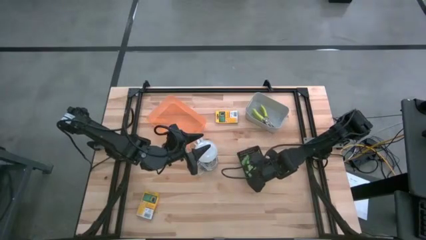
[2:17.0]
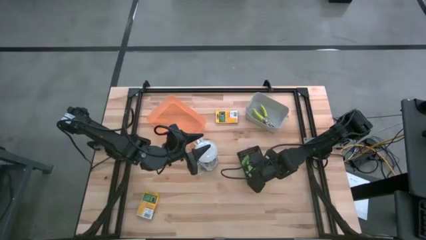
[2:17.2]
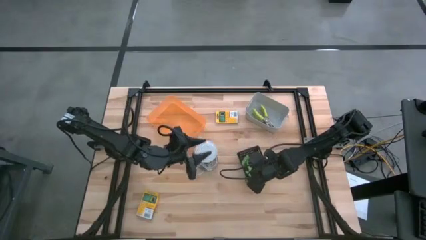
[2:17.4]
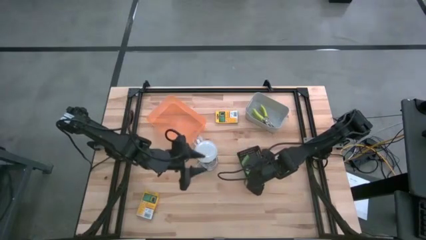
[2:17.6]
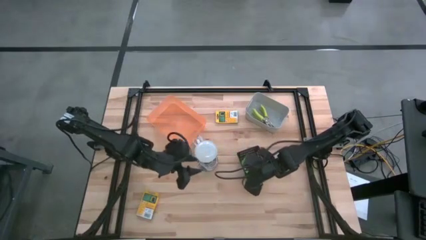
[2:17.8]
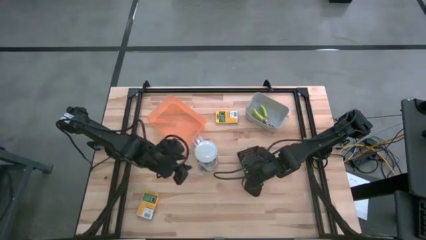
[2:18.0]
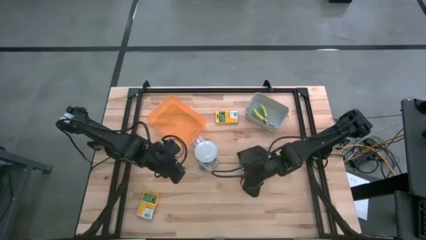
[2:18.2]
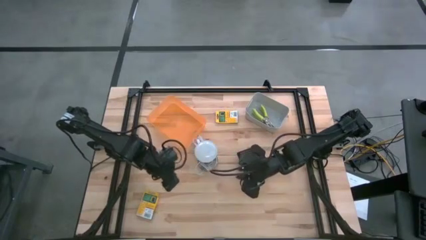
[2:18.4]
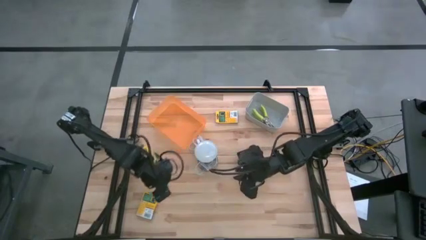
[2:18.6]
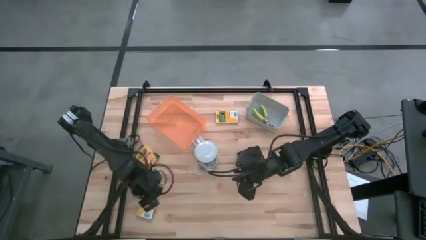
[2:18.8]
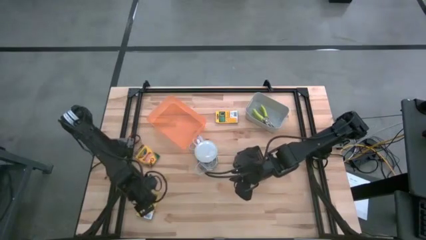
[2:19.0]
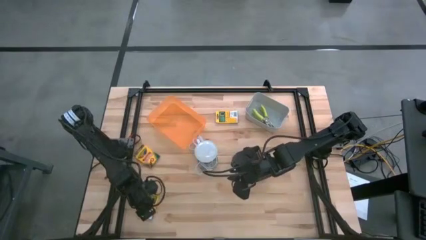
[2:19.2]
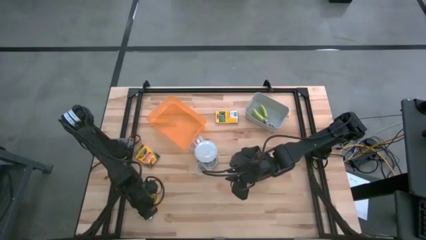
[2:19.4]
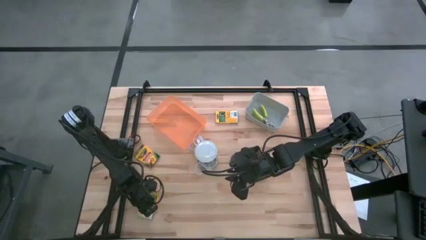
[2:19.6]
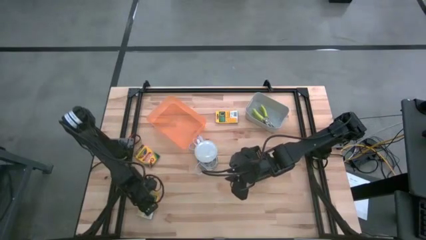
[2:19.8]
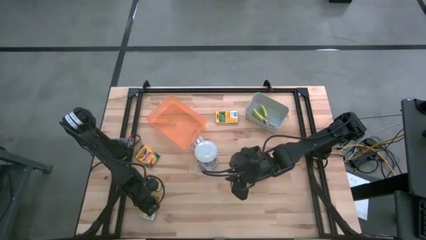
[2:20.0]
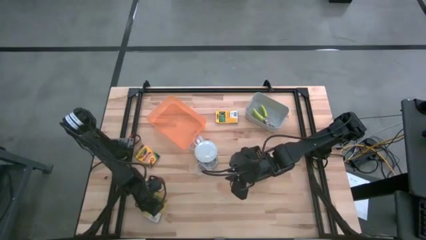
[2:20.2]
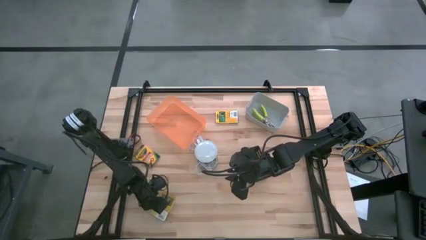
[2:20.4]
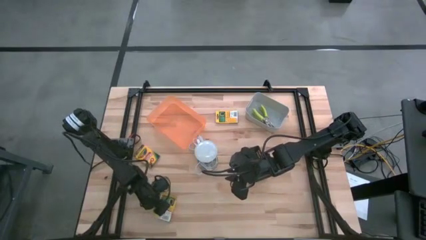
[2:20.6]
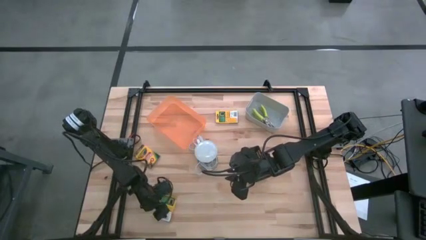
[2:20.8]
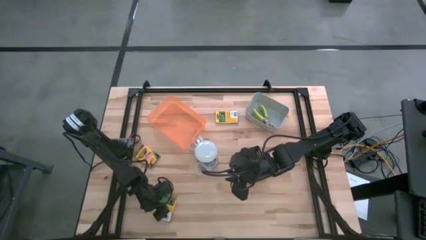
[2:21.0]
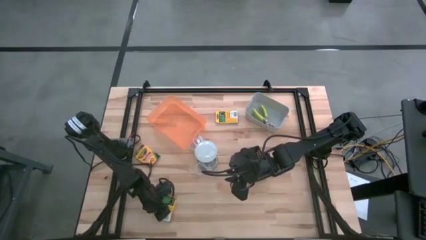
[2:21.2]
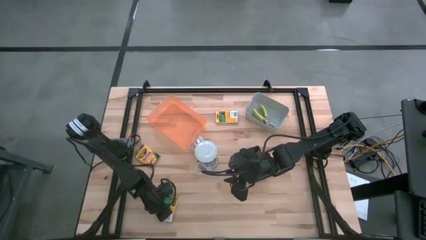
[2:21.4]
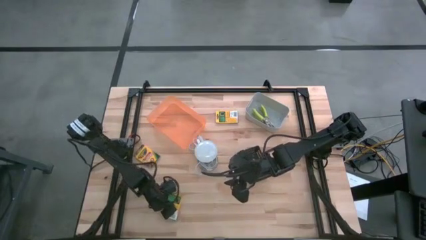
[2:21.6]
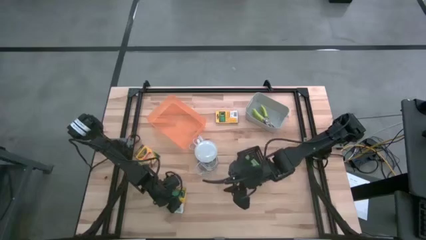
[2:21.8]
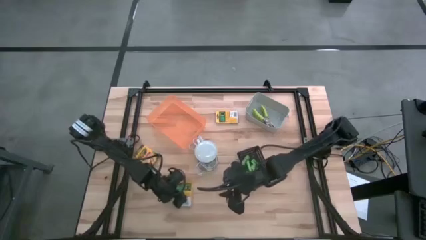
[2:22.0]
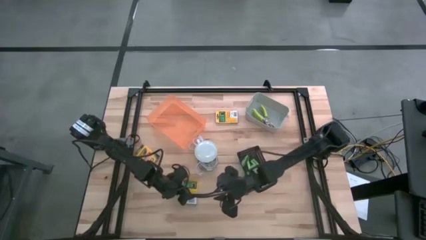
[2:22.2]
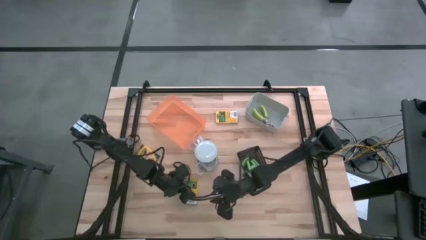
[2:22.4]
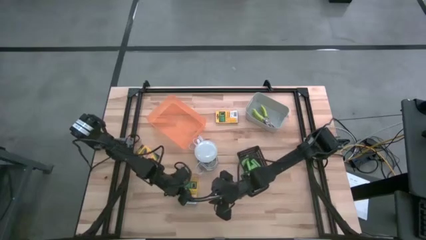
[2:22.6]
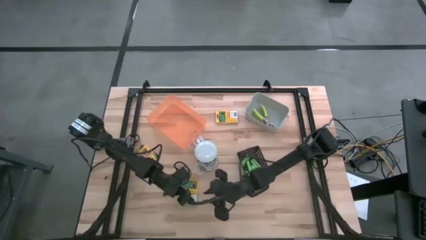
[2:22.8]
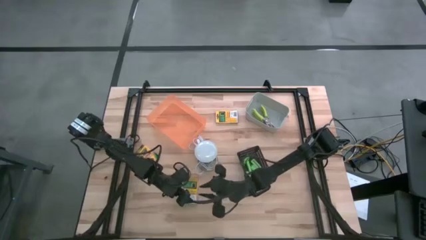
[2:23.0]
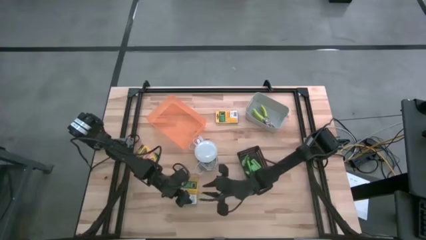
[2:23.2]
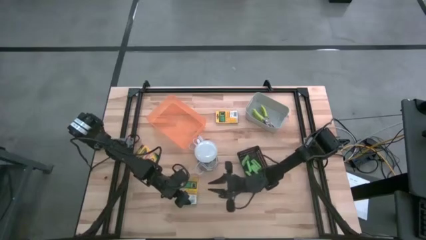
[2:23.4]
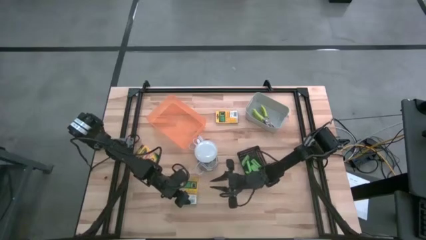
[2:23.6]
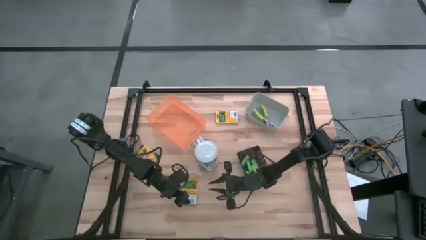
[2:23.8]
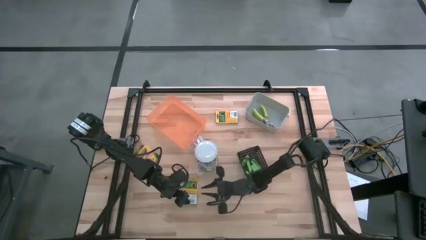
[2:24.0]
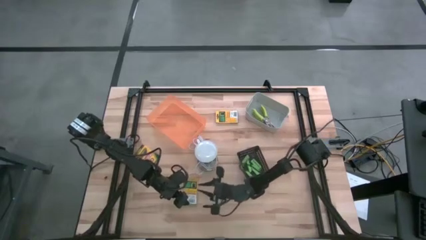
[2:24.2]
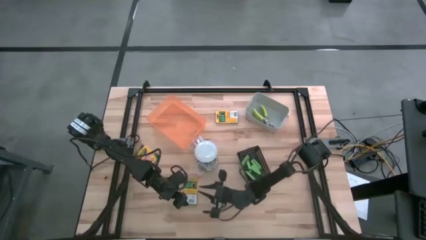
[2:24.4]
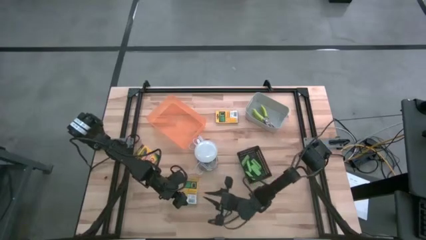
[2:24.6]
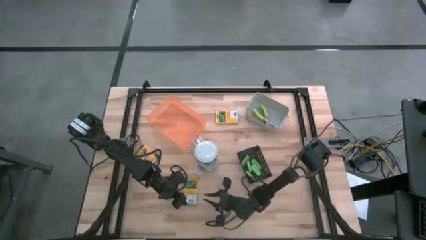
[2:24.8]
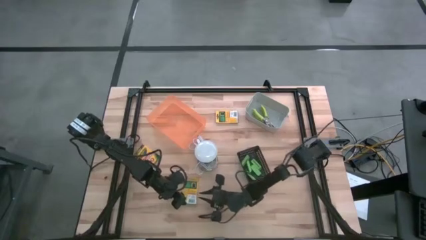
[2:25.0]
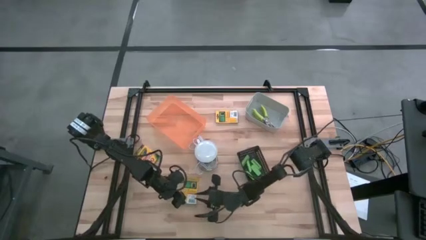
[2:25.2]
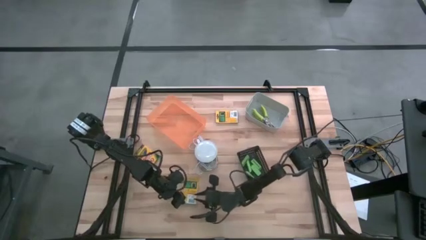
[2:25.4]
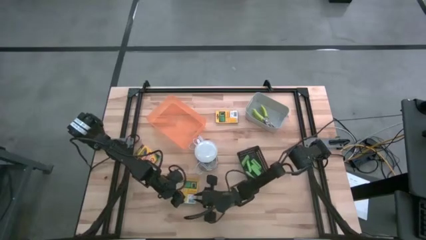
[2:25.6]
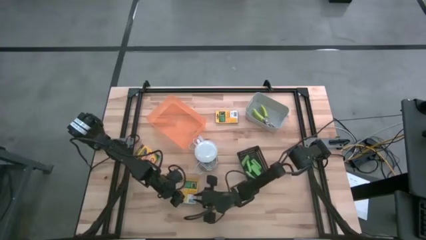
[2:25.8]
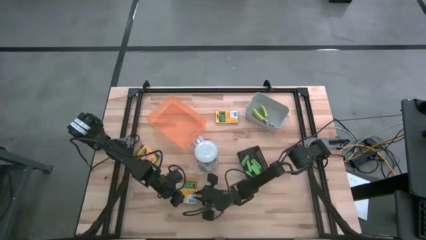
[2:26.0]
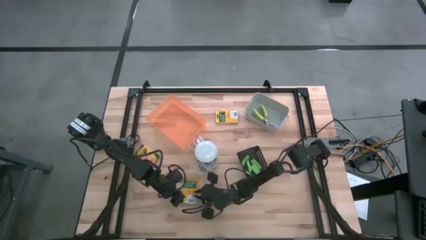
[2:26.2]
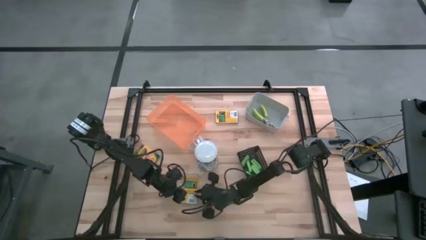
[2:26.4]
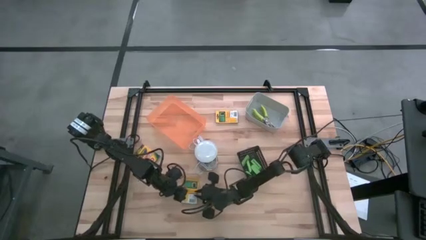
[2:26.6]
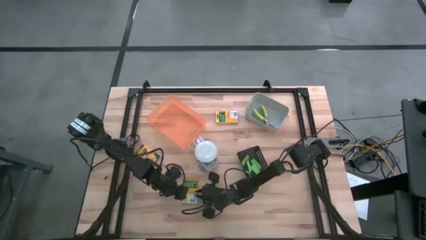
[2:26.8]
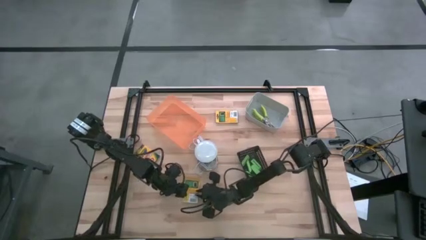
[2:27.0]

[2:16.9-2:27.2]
Task: Pick & Place School Supplies
Put the box of crayon into the orange bin

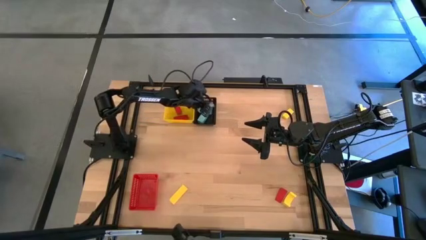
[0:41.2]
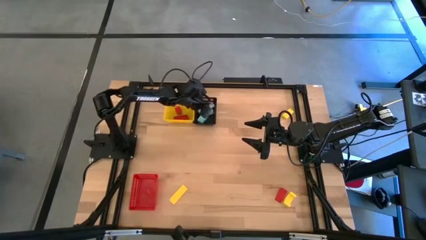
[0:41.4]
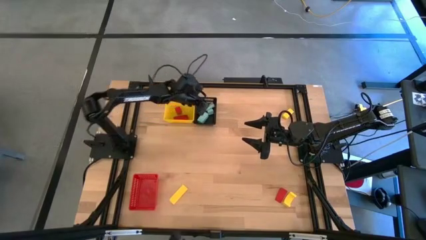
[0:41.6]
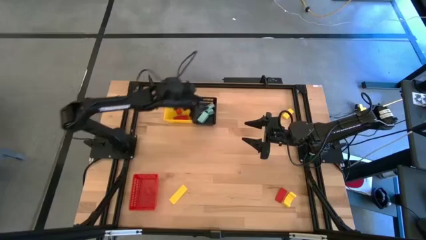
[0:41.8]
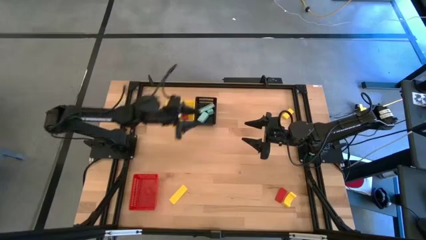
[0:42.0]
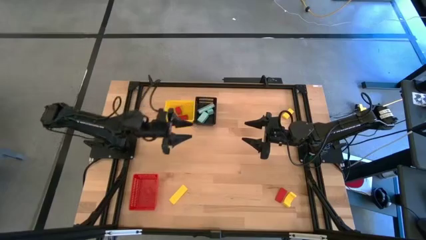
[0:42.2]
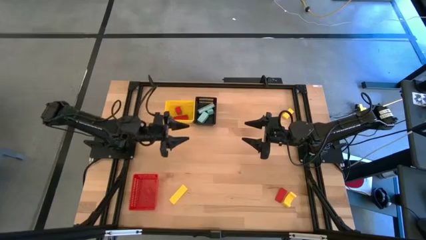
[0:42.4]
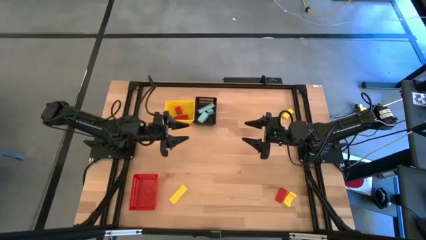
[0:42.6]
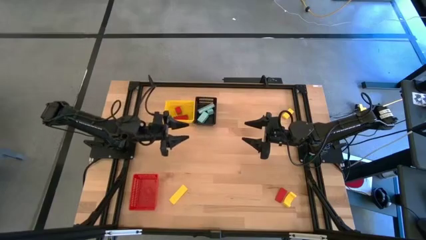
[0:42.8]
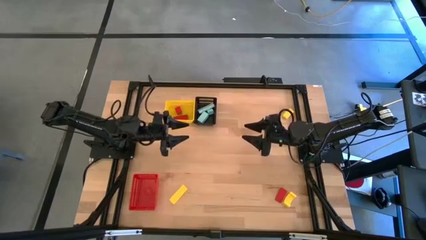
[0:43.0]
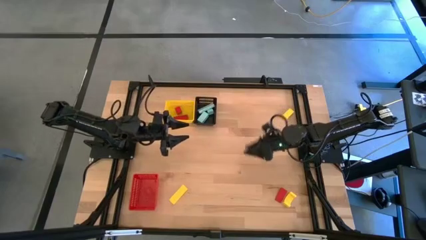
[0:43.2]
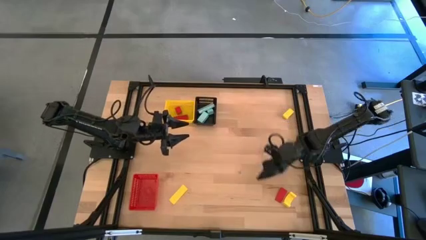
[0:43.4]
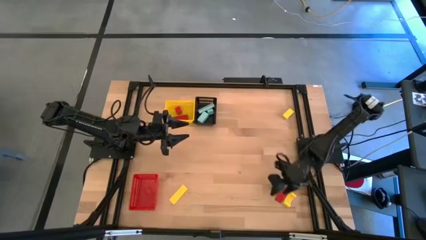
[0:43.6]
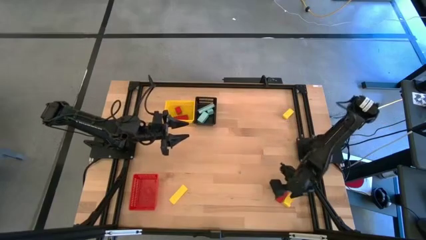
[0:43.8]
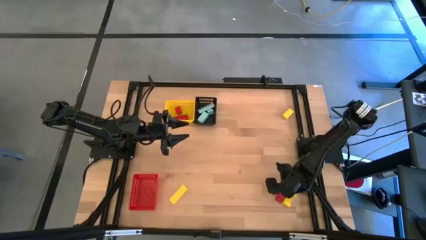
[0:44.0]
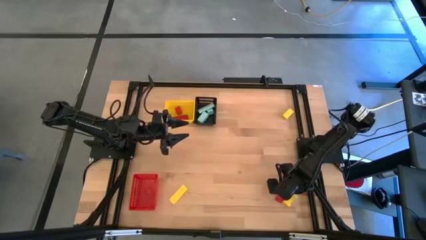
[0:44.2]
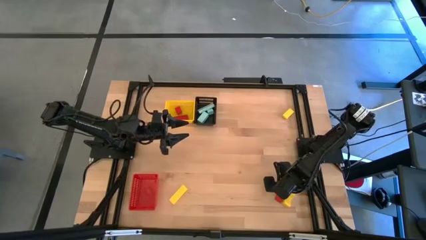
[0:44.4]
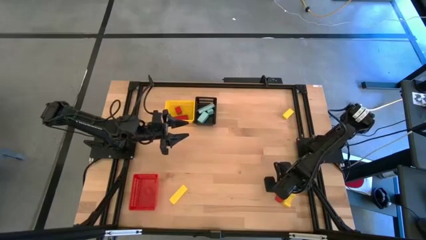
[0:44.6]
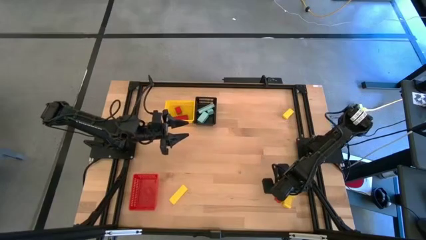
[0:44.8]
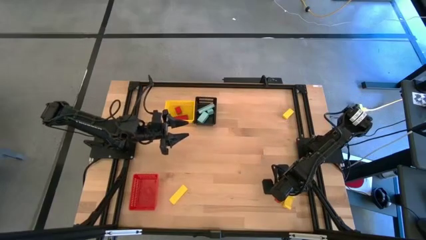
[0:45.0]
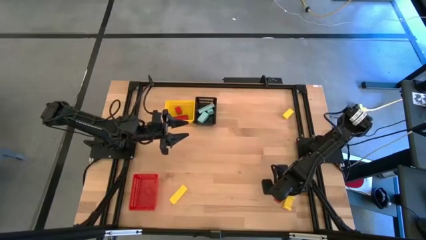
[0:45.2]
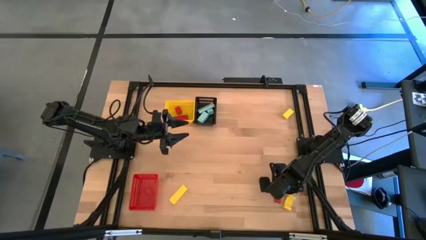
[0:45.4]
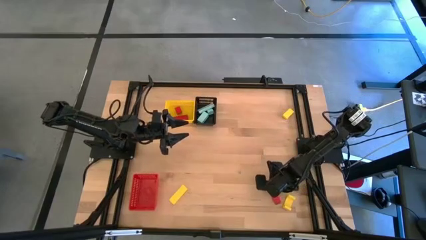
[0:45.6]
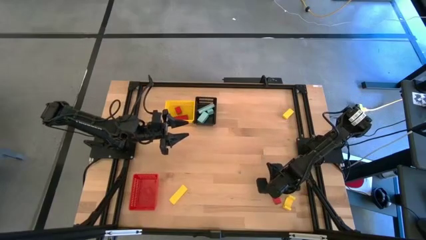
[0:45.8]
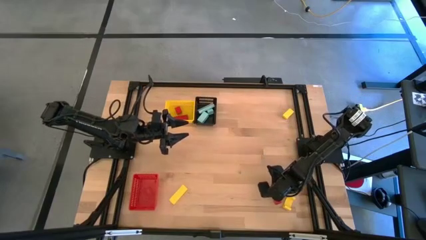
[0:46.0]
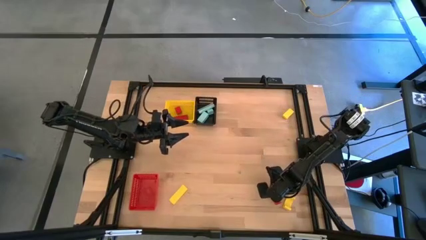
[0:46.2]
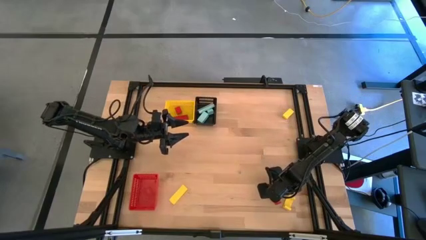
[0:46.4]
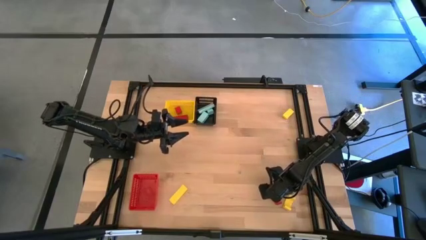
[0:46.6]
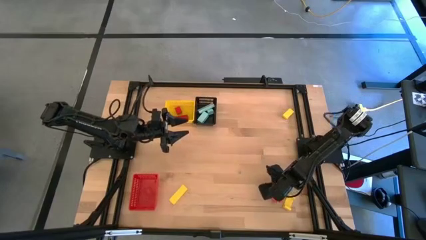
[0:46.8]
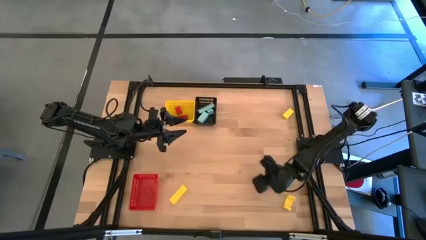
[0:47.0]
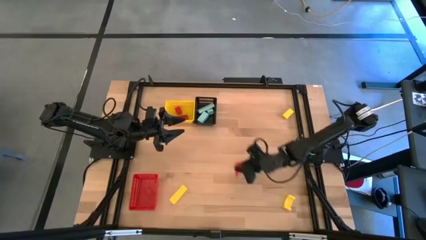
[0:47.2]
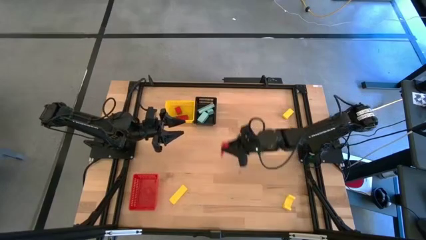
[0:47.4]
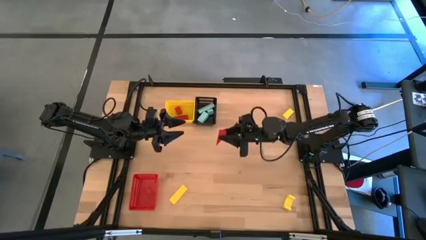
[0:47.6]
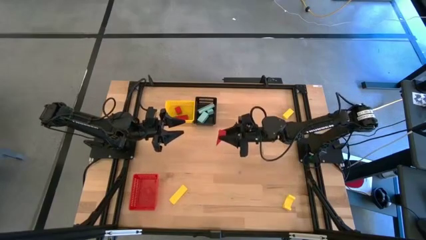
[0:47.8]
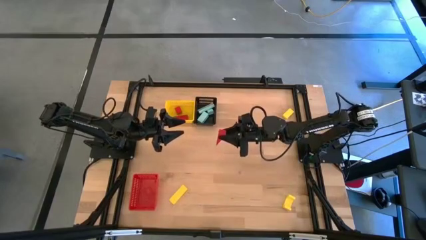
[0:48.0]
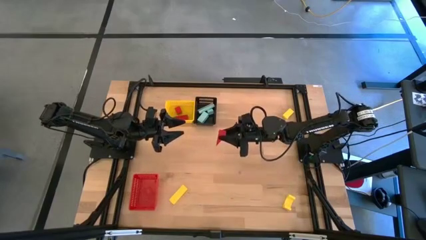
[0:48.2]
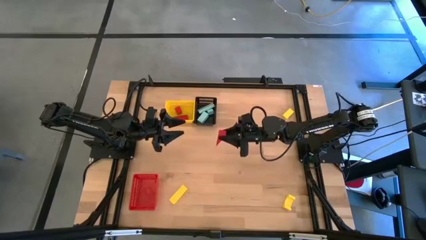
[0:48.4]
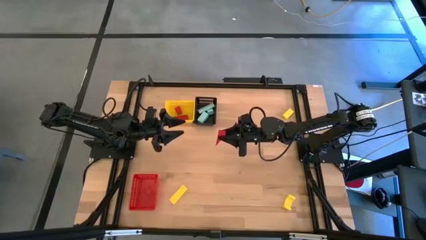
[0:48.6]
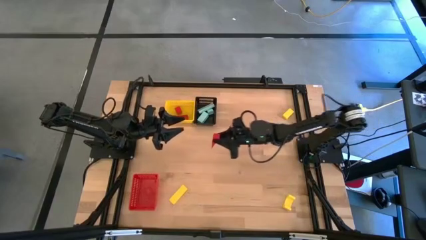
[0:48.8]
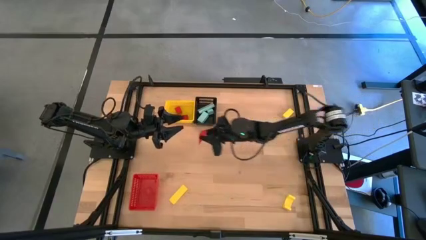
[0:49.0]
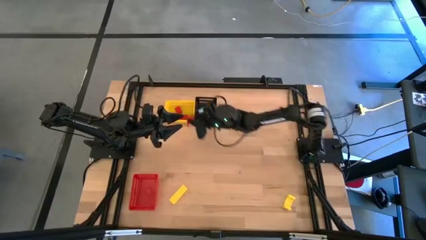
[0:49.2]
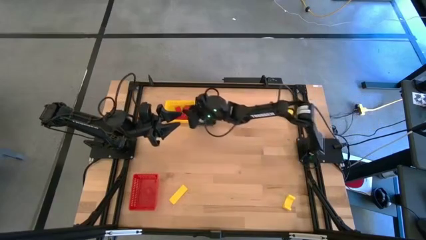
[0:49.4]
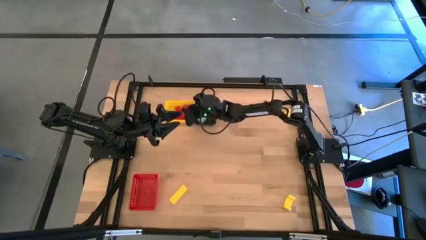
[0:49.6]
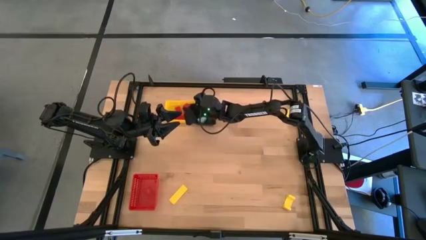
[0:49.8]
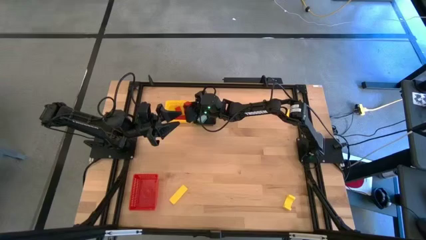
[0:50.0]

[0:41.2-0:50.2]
Task: Sort & place blocks by color
Put the red block into the yellow basket
